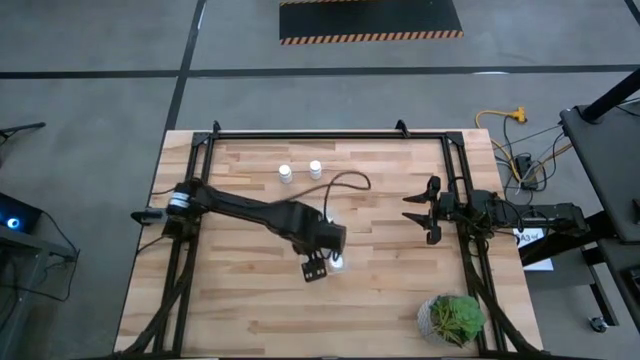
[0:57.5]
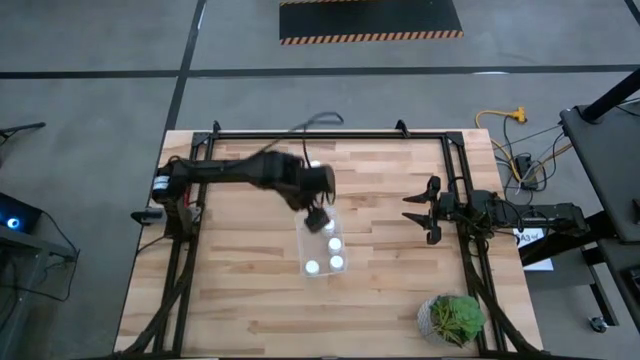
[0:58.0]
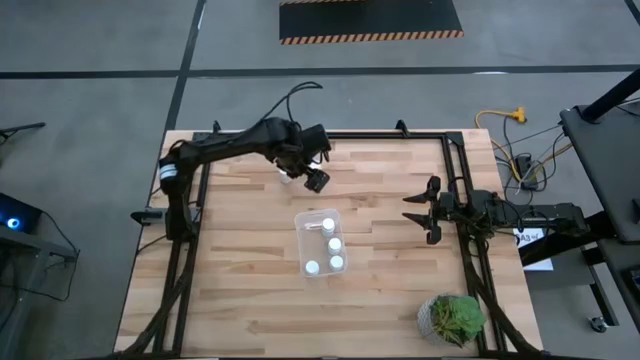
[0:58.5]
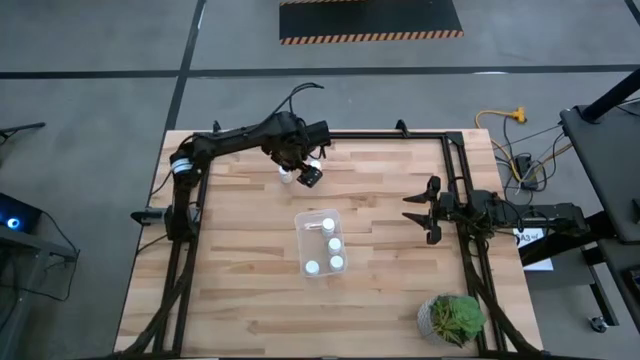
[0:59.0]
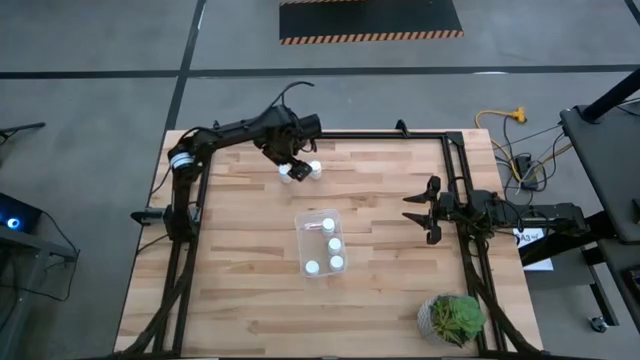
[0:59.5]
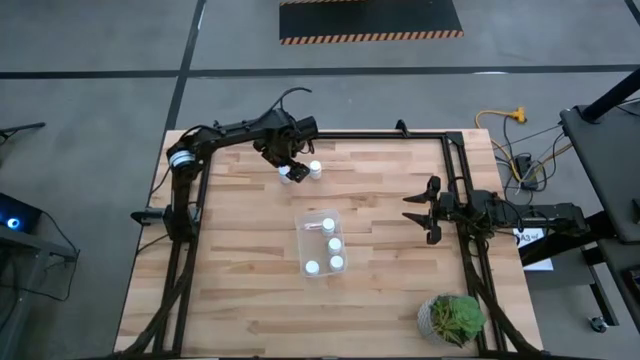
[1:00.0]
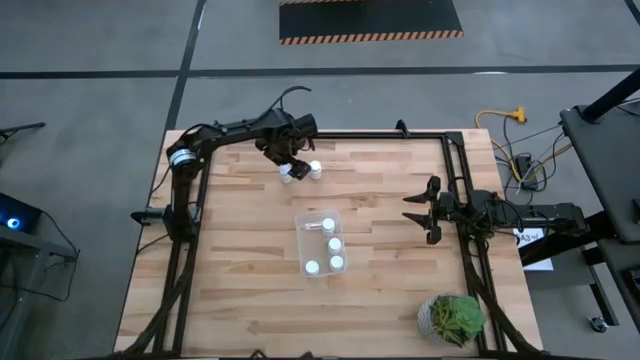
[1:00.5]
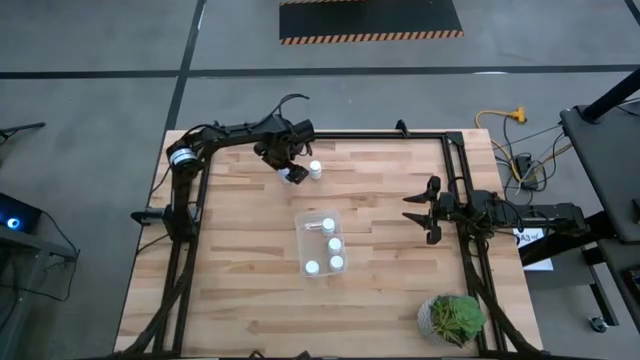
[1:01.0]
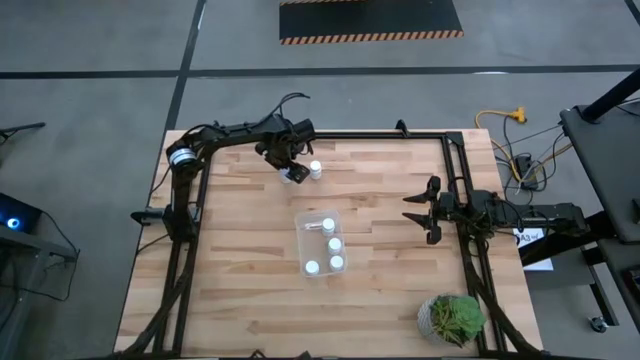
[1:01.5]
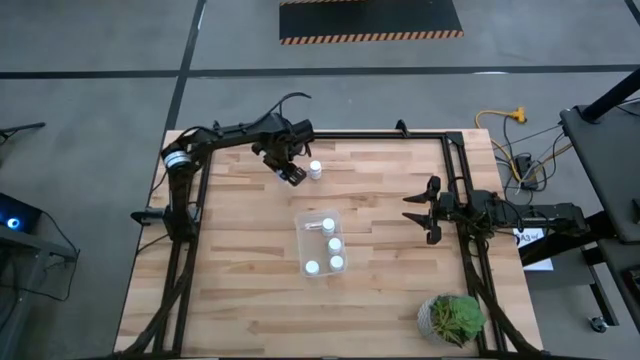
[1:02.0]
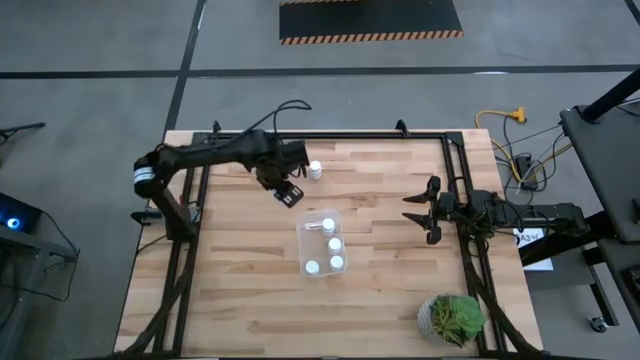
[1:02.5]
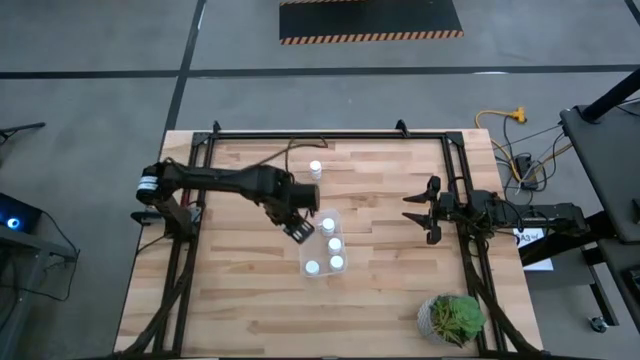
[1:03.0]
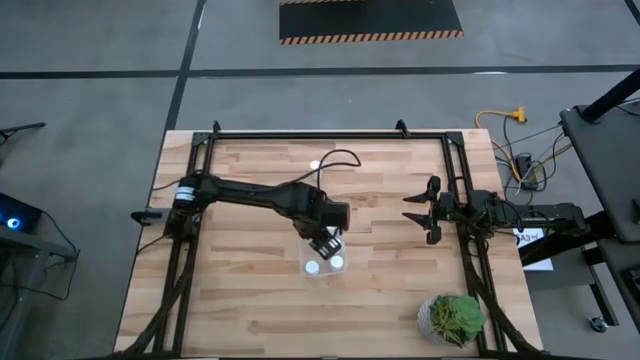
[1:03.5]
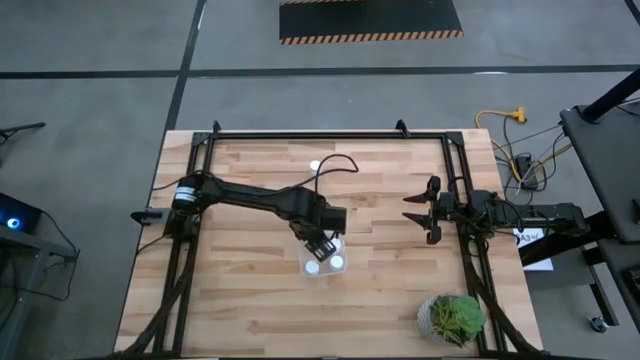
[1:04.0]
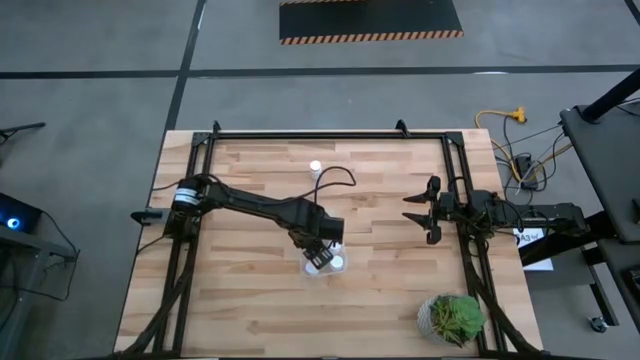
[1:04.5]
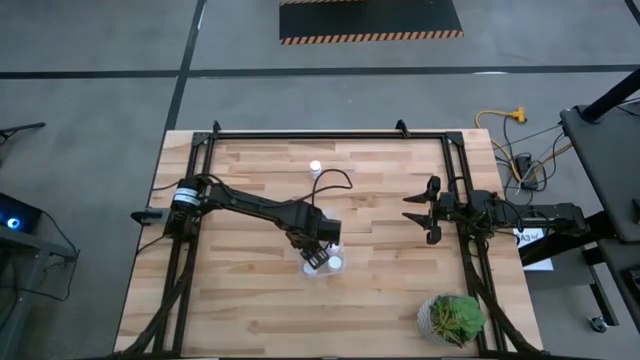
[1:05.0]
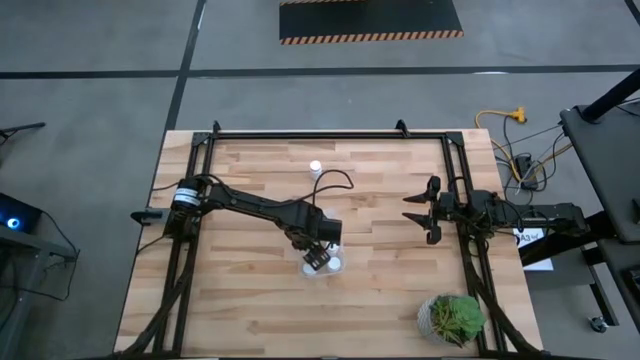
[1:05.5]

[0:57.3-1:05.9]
Task: Pick and place pill bottles into a basket
Put the white pill bottle into the transparent bin

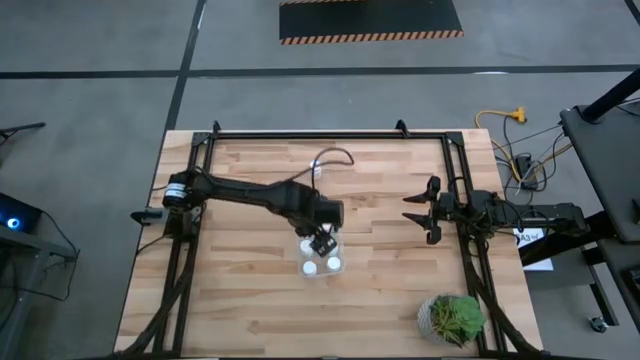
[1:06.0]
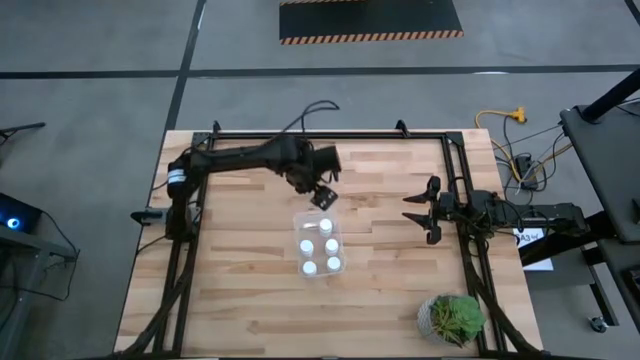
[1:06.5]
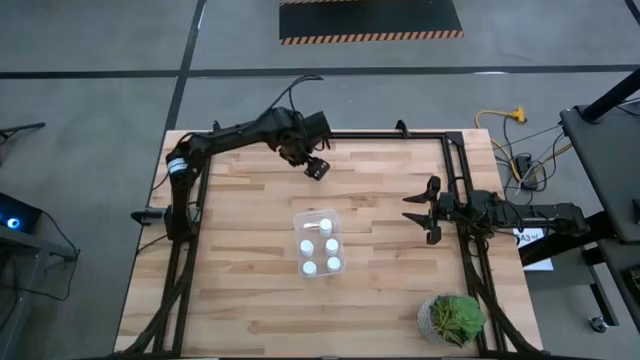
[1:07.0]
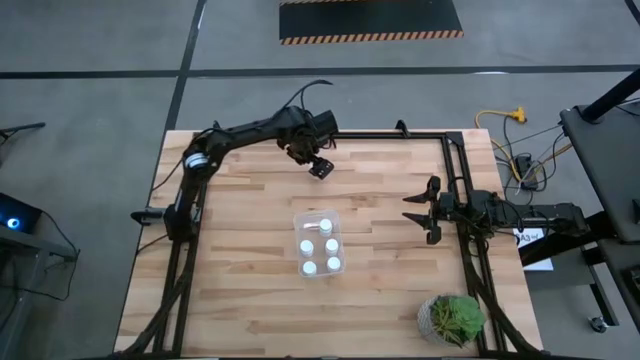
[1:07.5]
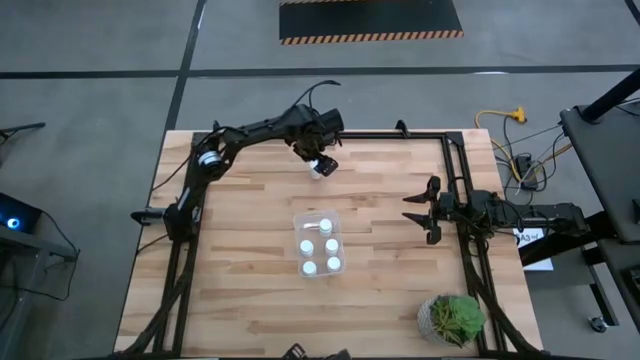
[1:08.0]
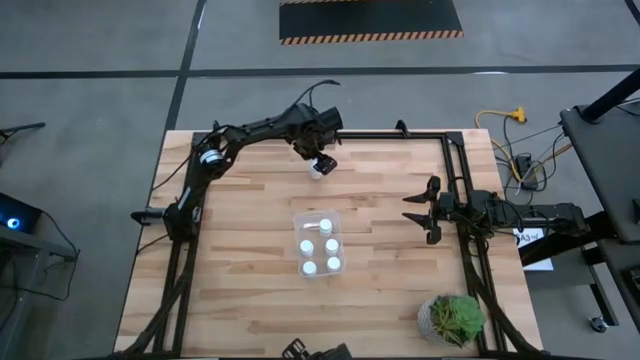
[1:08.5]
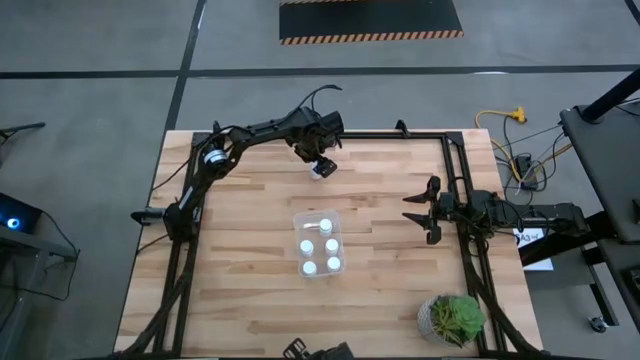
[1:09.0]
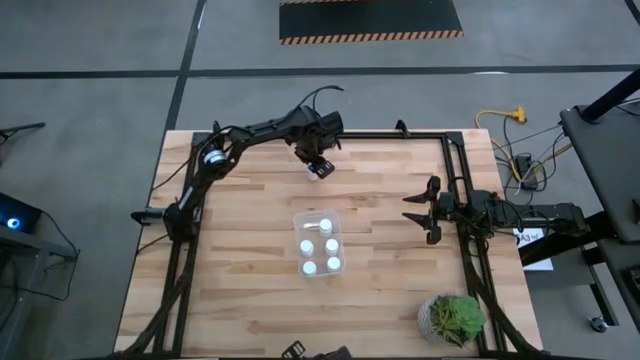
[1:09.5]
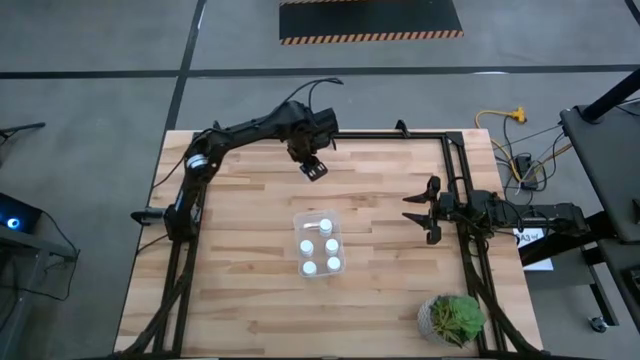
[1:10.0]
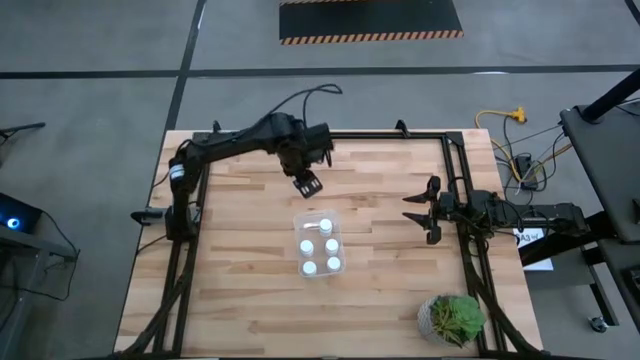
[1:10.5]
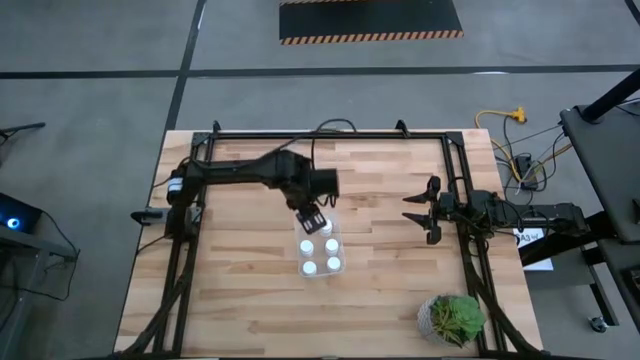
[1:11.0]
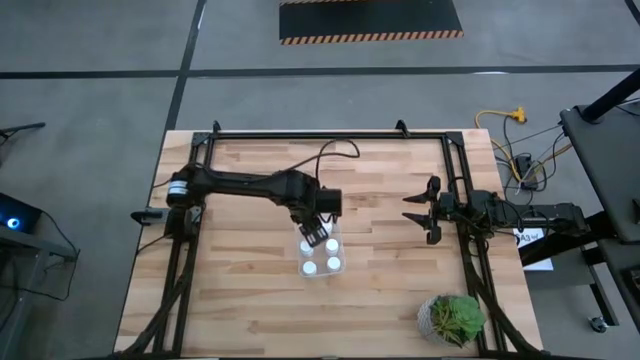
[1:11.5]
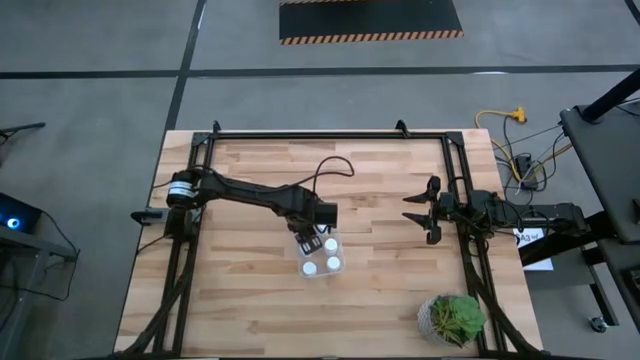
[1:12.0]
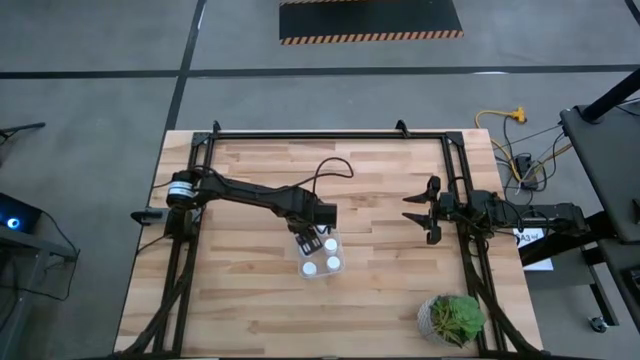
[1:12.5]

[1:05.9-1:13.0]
Put the white pill bottle into the transparent bin

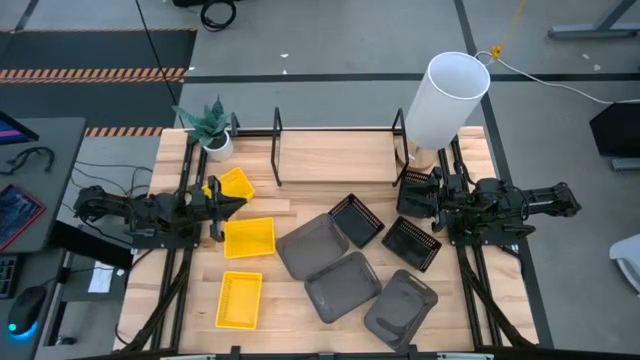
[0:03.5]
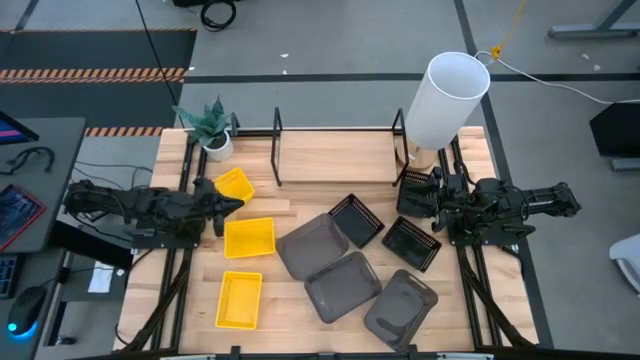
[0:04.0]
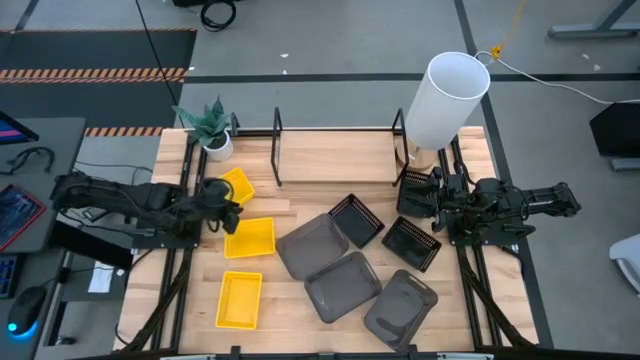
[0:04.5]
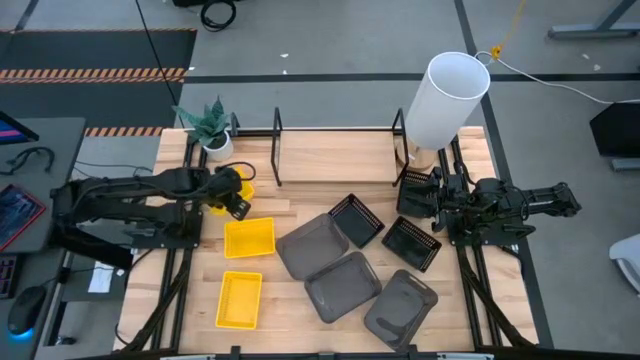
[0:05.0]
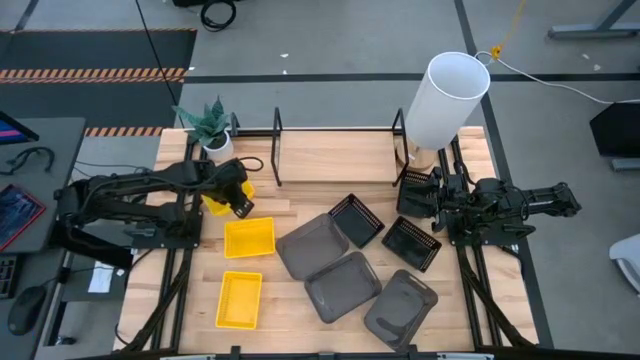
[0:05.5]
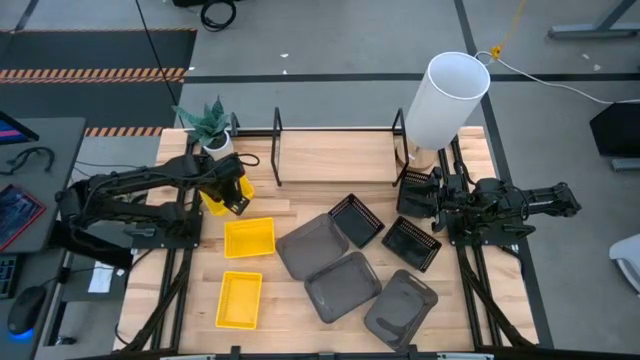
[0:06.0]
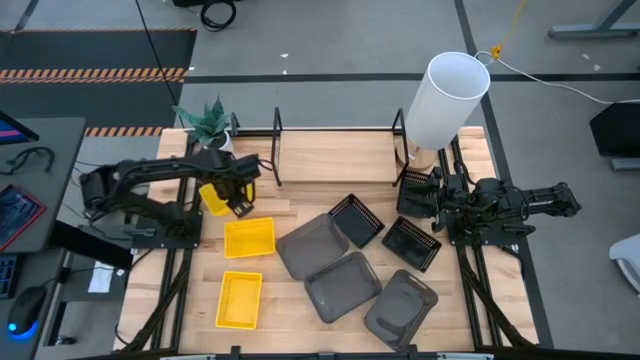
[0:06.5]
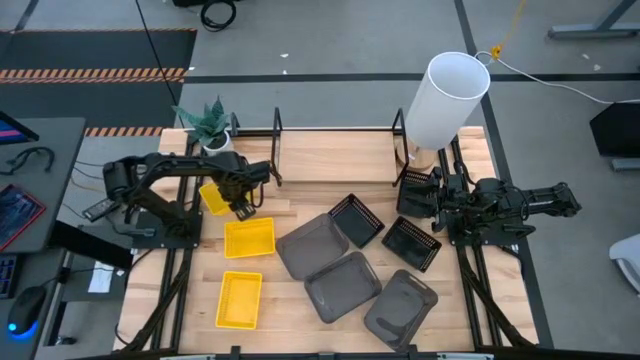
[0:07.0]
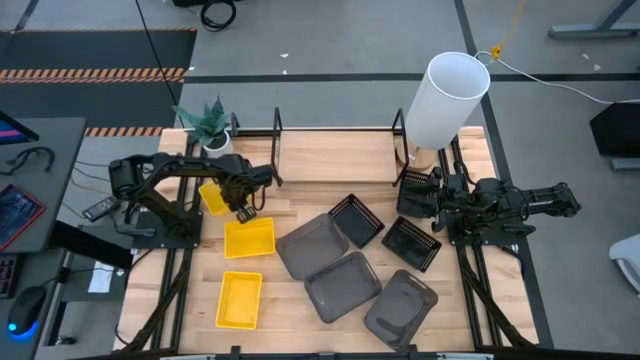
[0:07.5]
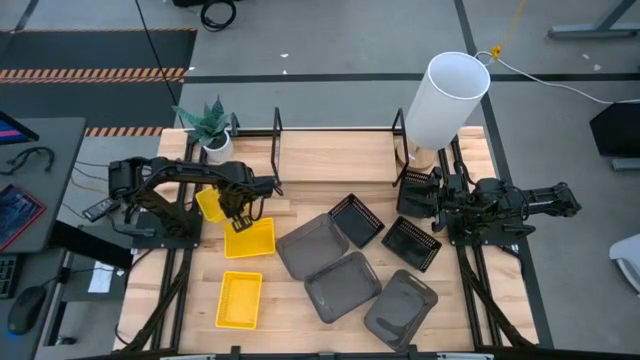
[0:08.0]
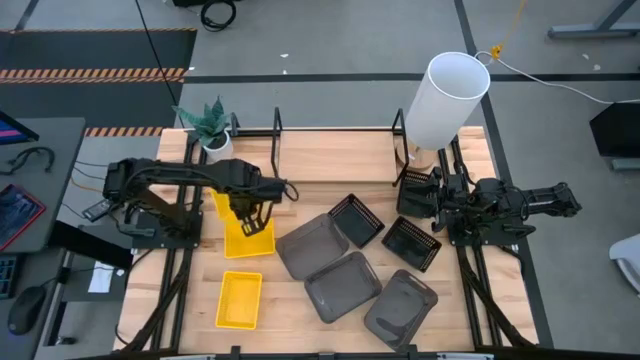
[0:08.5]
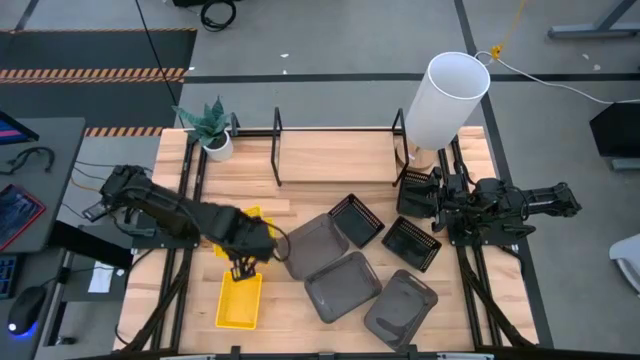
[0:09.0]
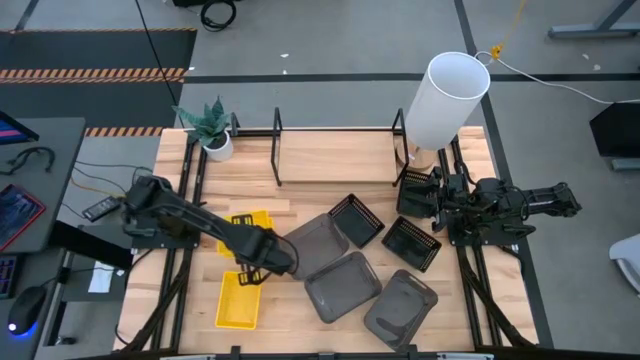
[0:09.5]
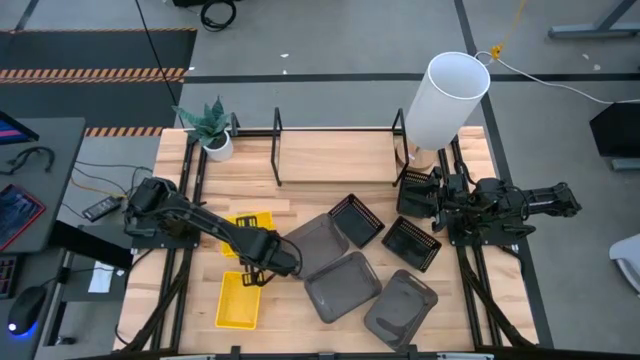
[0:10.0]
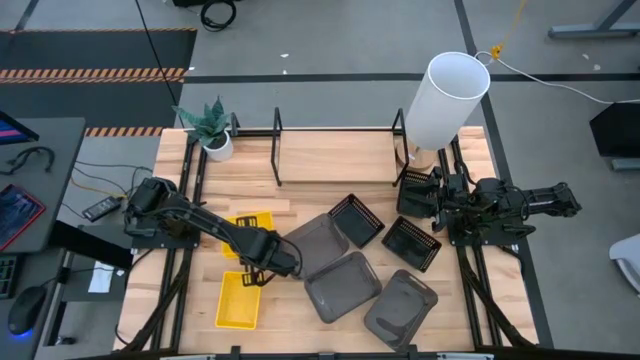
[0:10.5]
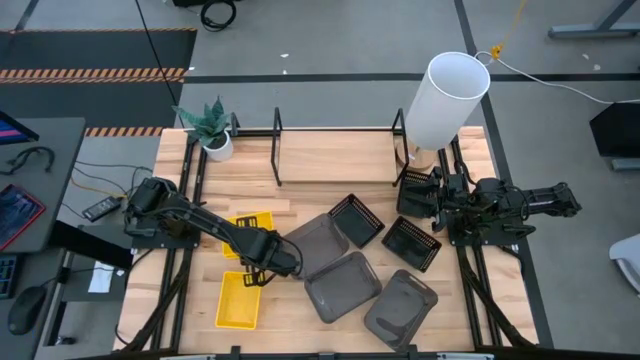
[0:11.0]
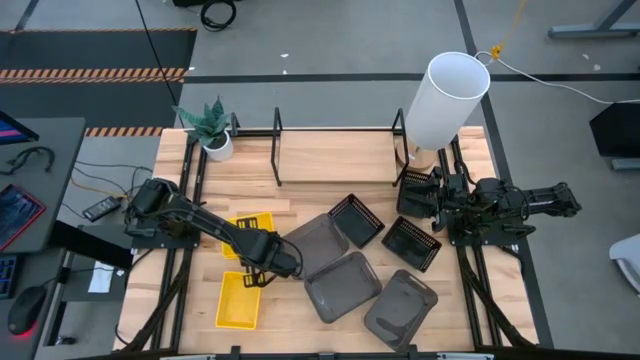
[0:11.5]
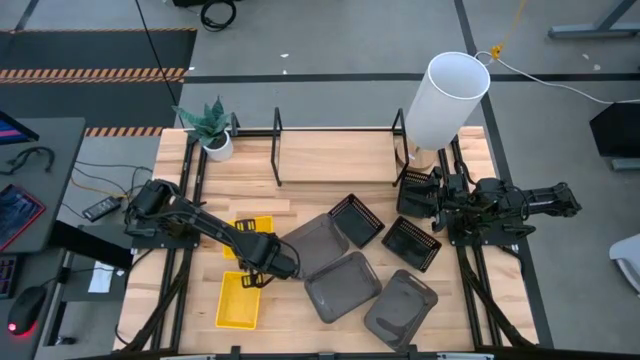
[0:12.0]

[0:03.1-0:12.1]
Task: Stack baskets on shelf by color
Stack the top yellow bin on the middle yellow bin
